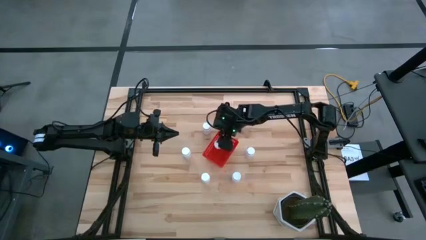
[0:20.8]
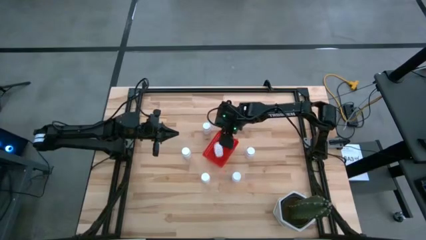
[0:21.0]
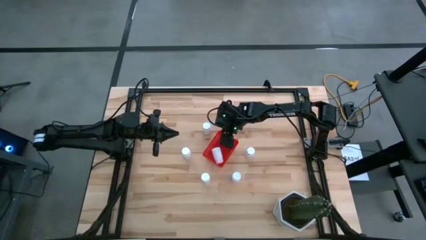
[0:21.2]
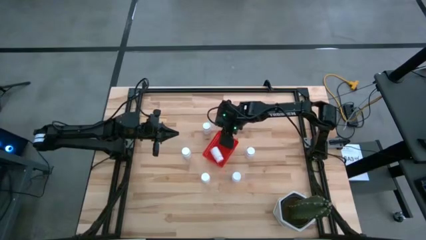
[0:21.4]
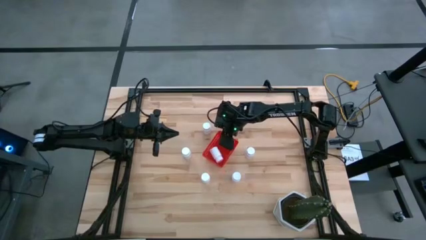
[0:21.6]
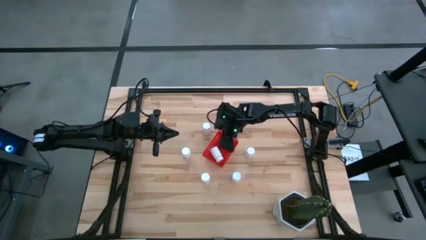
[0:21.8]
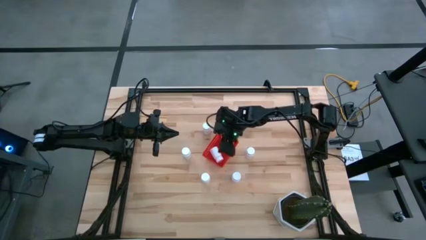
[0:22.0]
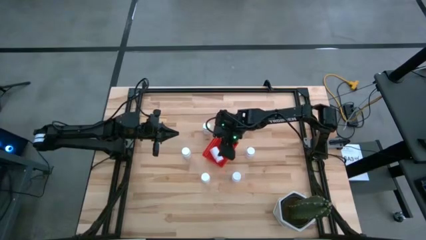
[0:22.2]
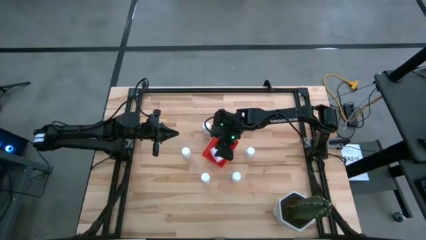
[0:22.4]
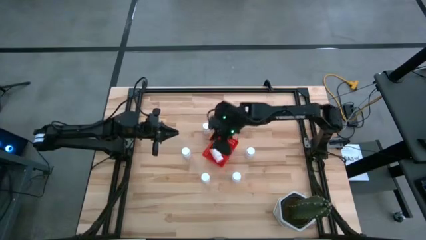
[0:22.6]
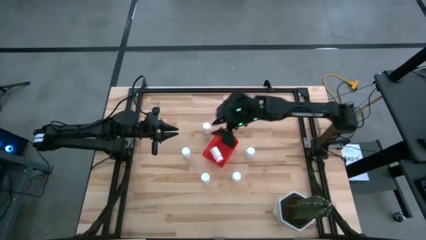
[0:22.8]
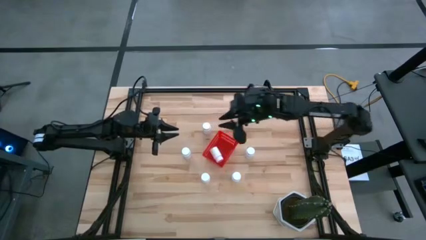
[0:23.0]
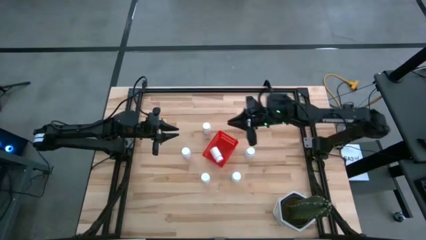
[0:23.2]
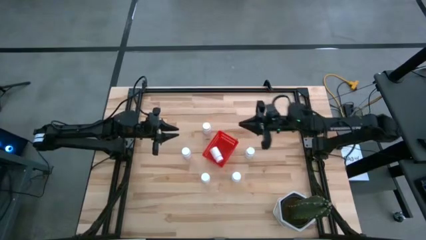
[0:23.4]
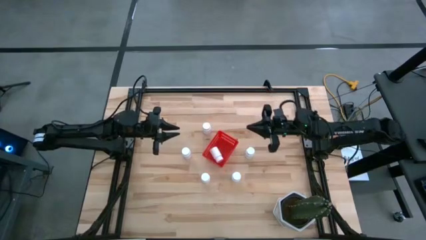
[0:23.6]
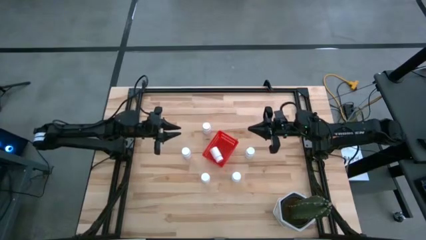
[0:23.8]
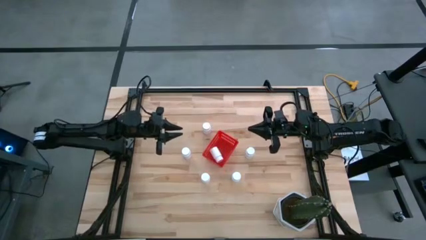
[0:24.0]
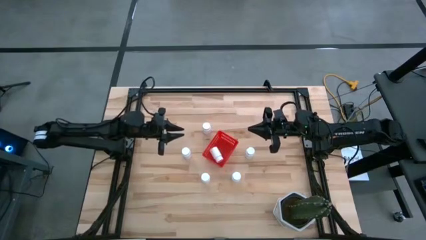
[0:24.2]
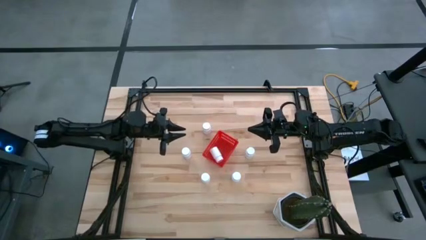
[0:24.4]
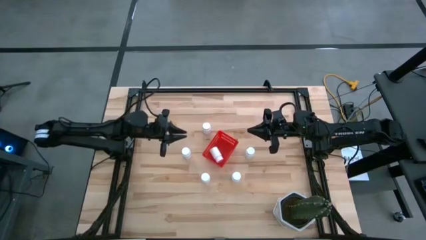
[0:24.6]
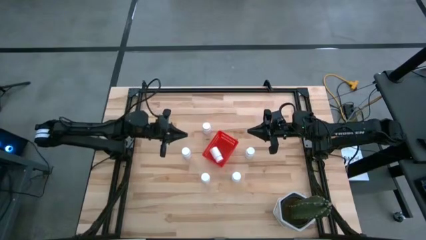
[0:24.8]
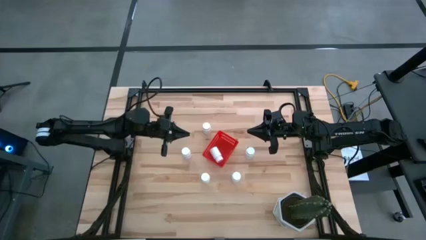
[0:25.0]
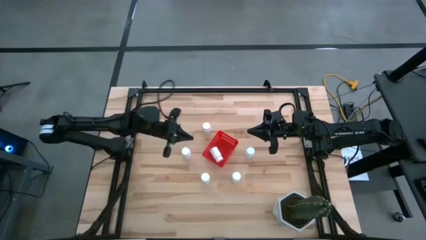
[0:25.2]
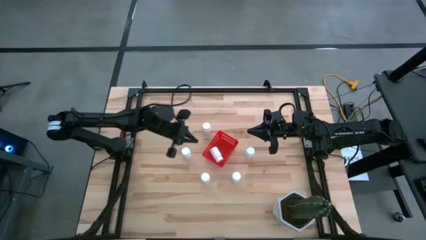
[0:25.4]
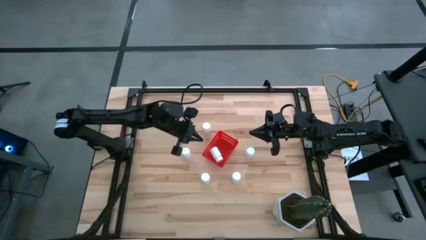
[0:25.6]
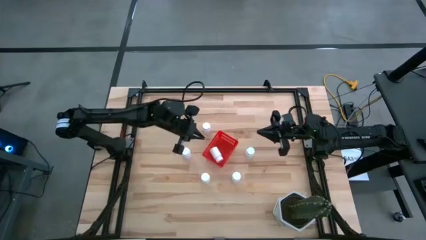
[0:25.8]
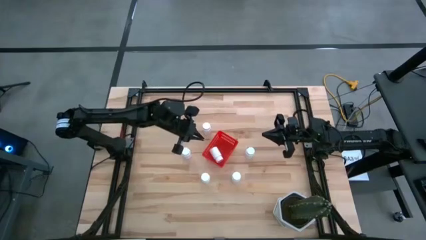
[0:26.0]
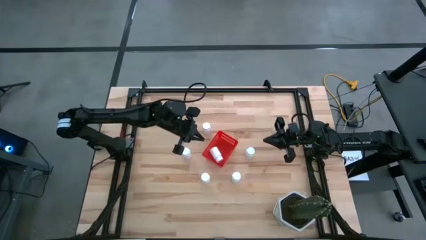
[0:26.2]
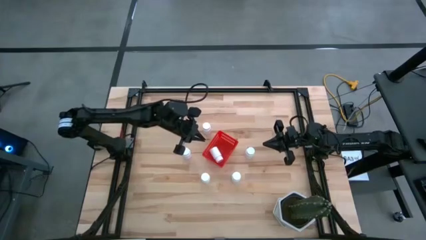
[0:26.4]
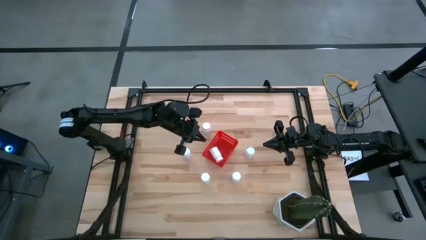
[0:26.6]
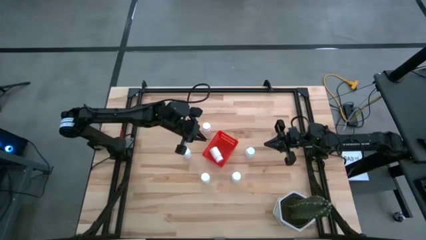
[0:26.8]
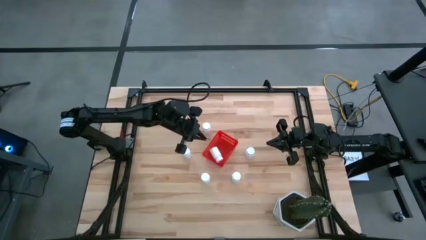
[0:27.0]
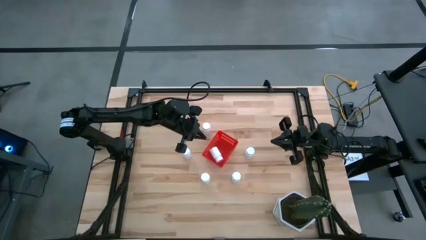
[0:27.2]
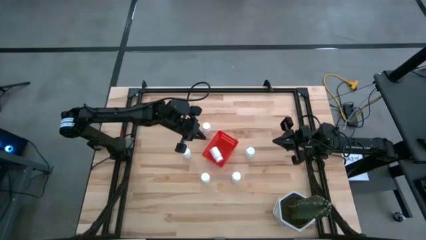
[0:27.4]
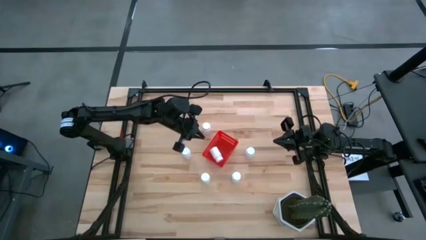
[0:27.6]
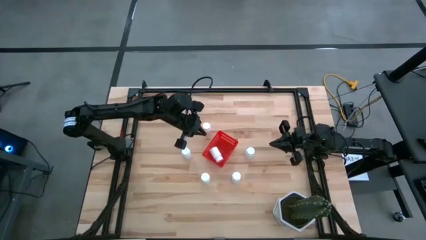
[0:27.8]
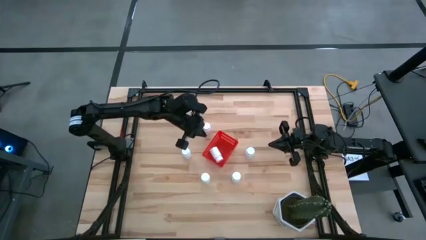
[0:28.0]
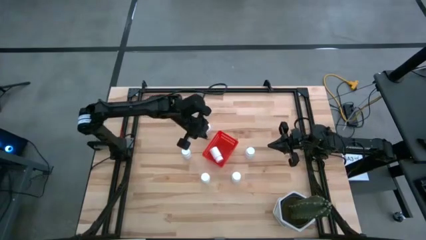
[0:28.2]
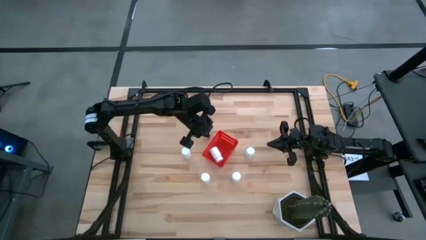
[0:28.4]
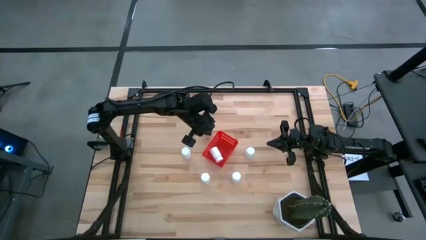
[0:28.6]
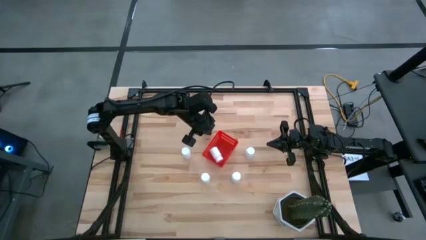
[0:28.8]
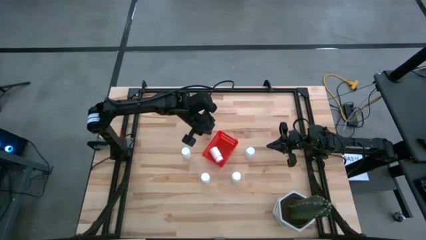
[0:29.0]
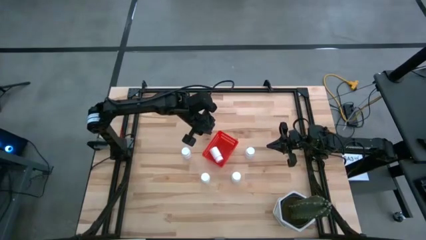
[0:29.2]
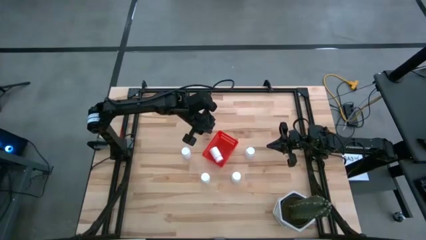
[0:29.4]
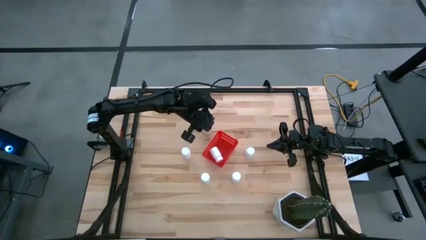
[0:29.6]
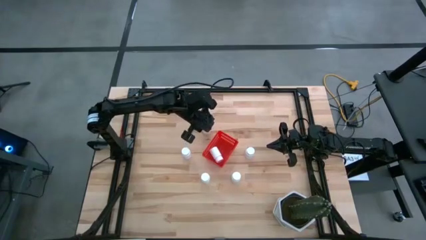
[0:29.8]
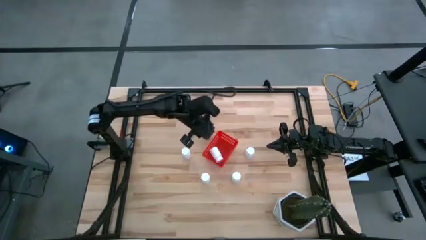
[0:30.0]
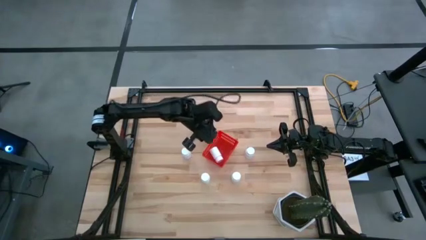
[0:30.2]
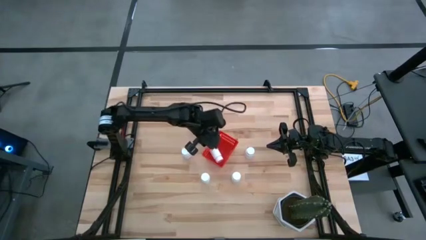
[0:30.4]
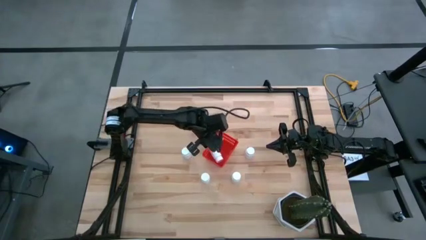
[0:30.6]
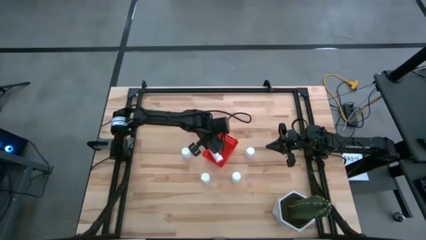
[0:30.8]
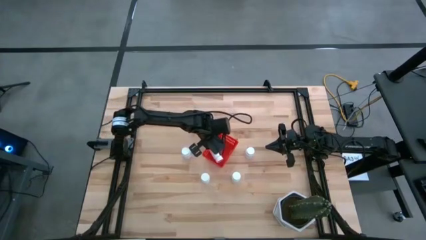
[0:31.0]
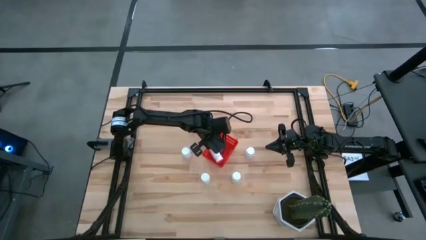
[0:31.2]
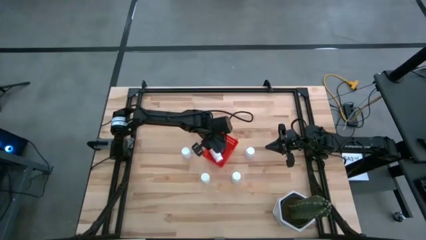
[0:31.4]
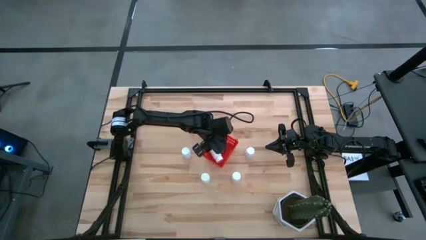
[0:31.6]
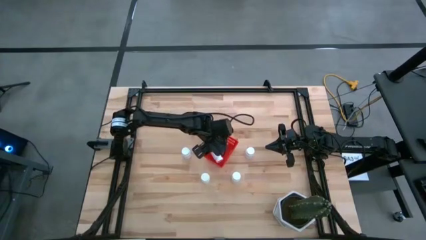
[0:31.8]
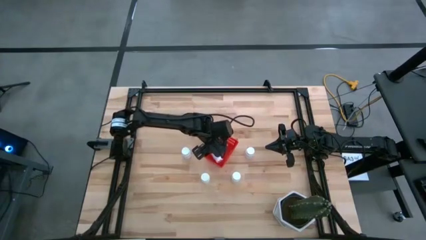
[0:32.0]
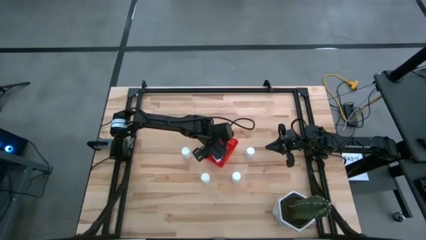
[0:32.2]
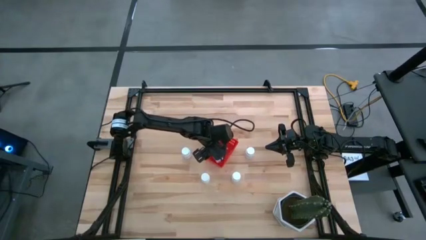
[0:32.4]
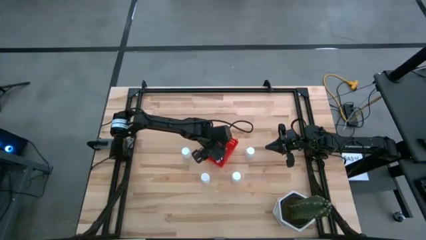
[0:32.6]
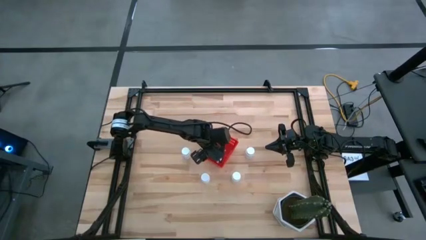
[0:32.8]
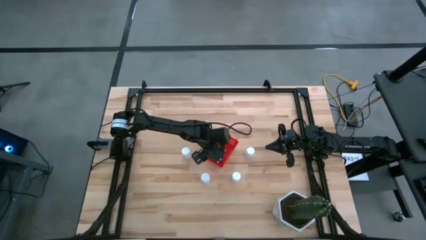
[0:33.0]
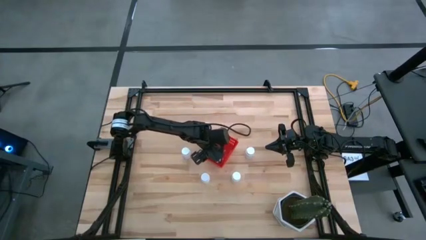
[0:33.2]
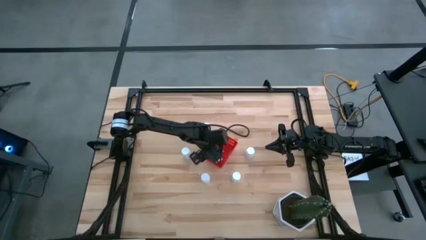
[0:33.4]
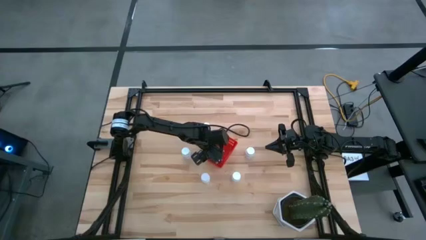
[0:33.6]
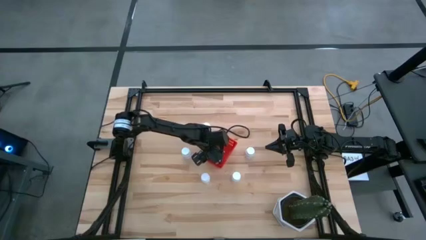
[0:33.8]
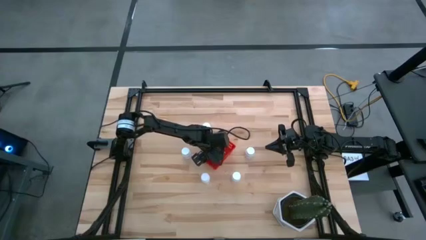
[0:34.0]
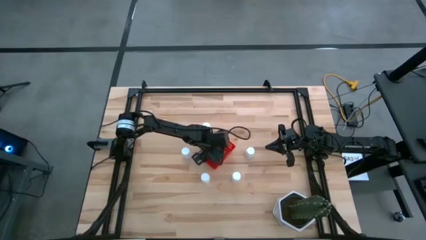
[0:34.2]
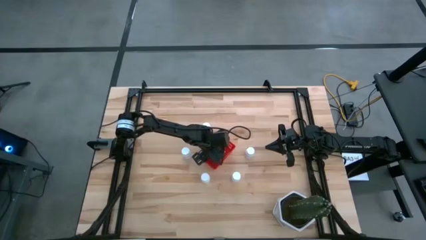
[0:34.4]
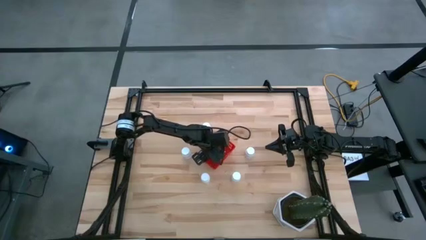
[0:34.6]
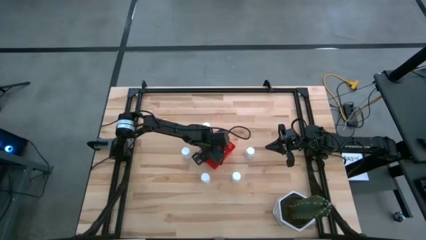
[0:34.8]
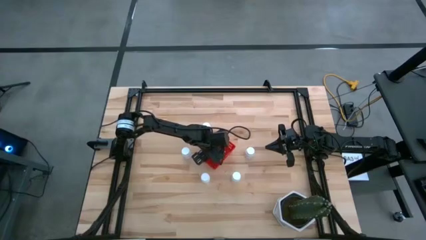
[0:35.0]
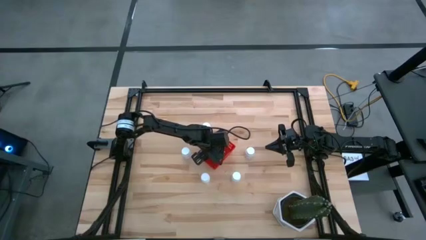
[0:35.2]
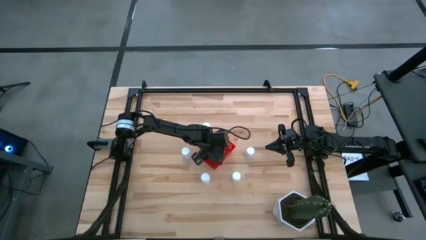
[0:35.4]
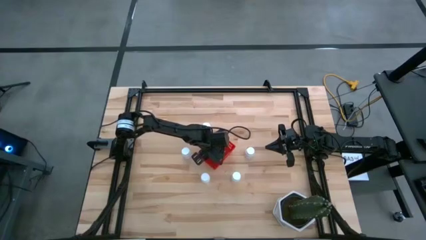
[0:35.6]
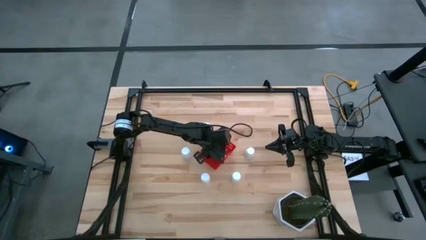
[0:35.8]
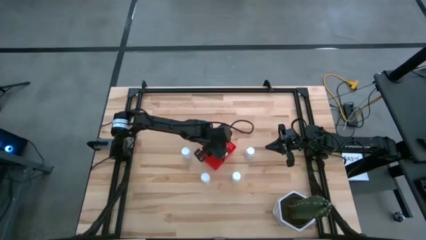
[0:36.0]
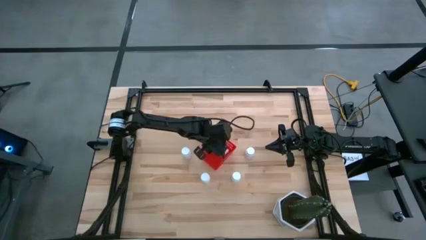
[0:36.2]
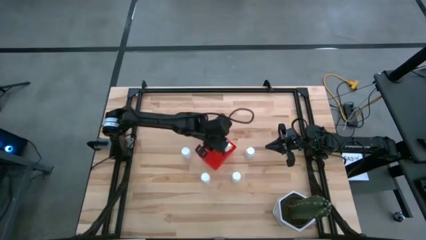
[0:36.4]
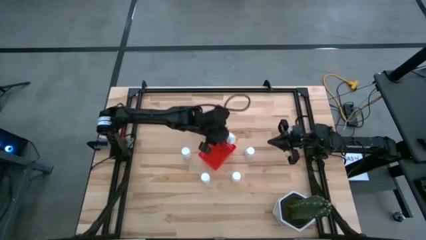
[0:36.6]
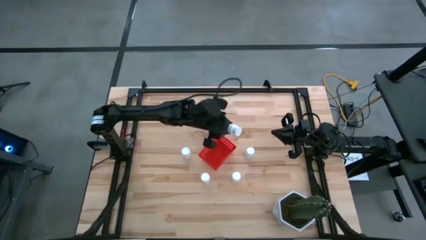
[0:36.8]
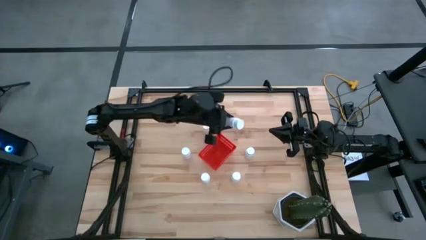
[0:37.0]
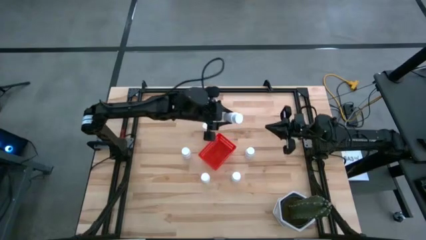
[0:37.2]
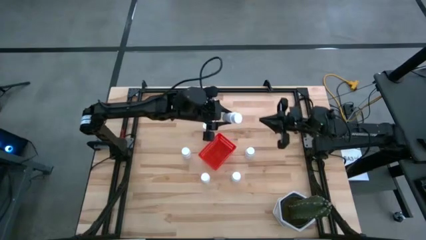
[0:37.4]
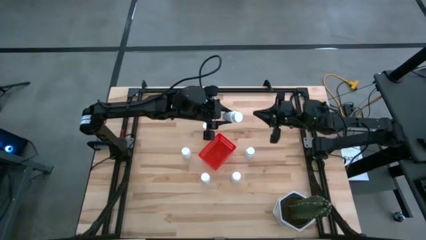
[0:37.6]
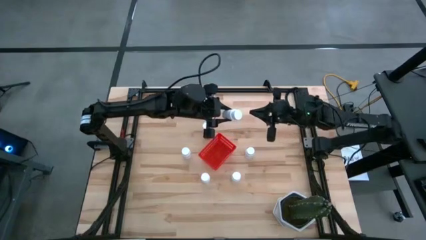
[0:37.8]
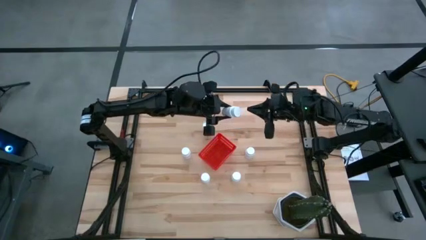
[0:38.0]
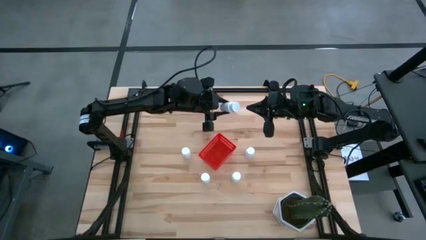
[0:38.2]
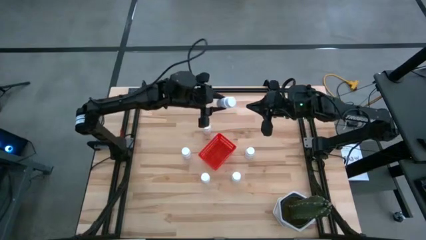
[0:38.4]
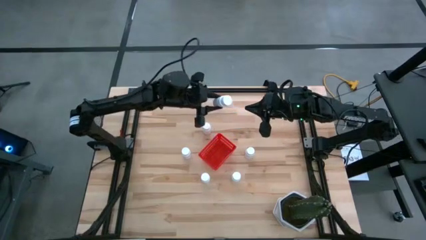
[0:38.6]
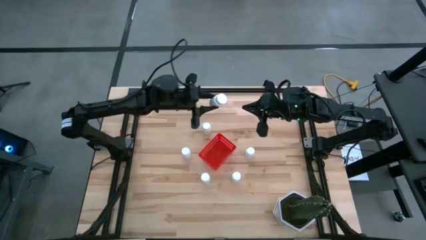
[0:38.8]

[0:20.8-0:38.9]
Task: Pick and place pill bottles into a basket
Put the white pill bottle into the red basket
